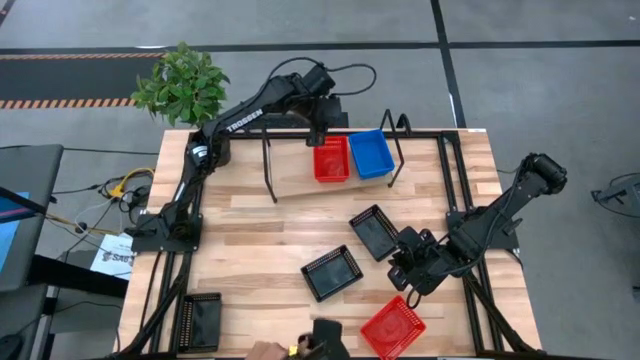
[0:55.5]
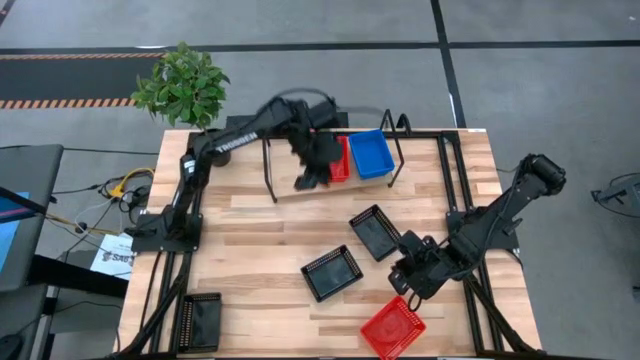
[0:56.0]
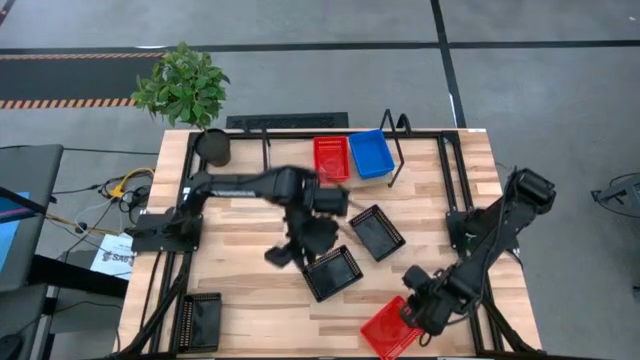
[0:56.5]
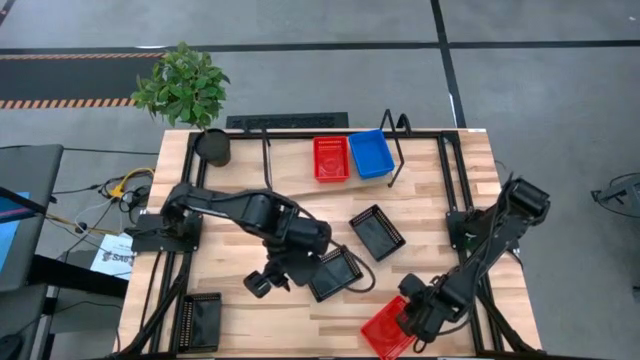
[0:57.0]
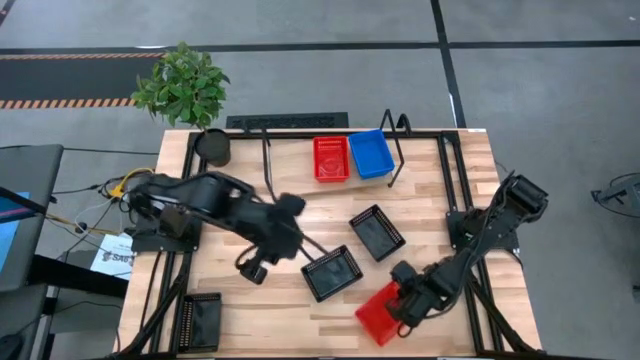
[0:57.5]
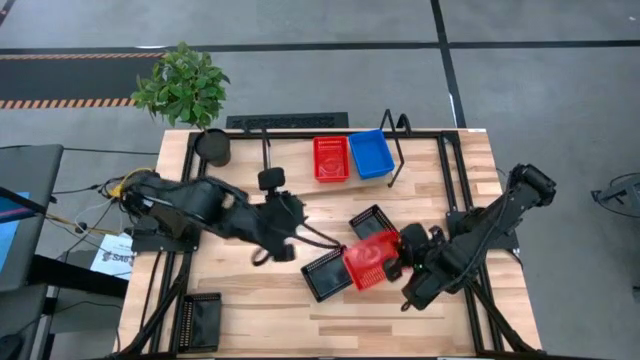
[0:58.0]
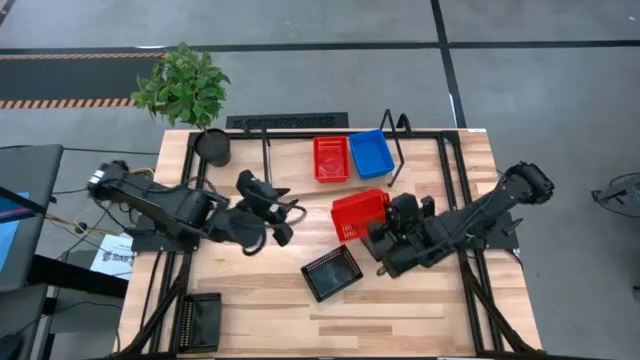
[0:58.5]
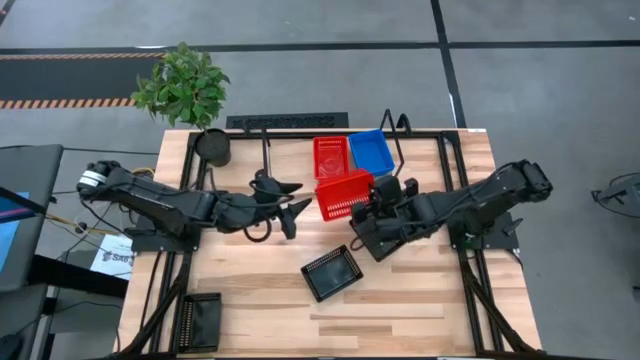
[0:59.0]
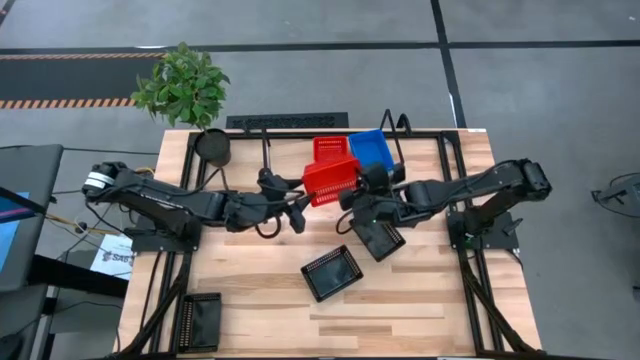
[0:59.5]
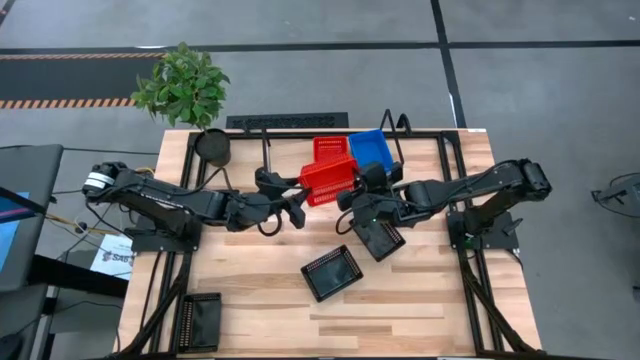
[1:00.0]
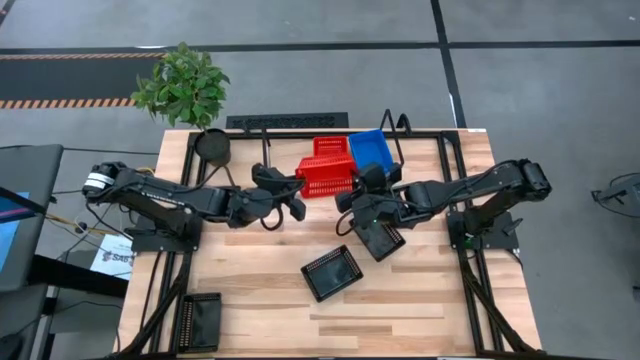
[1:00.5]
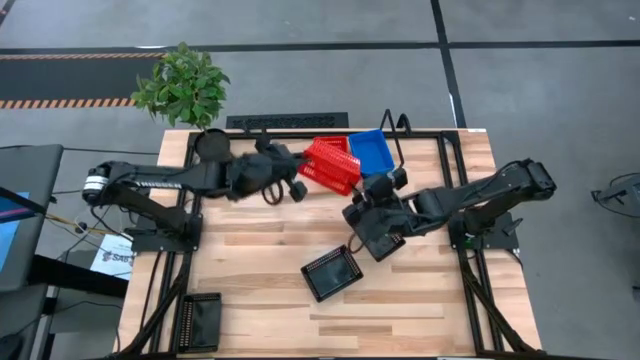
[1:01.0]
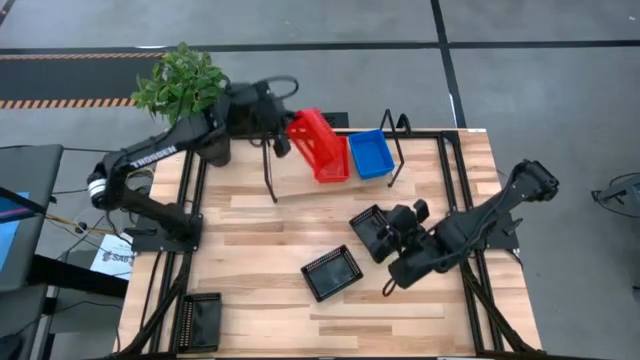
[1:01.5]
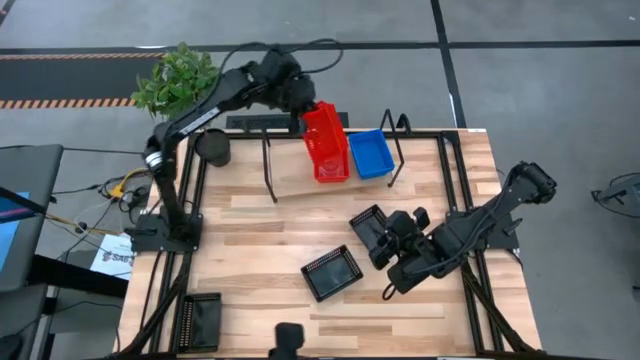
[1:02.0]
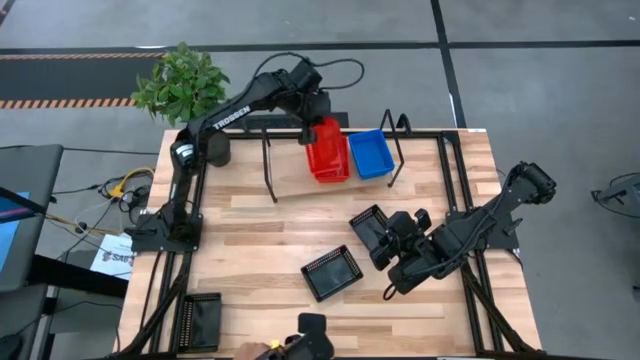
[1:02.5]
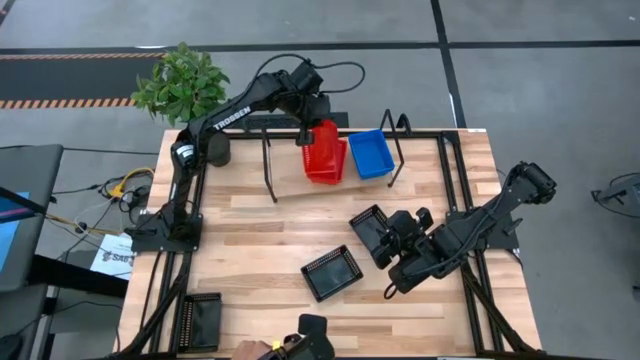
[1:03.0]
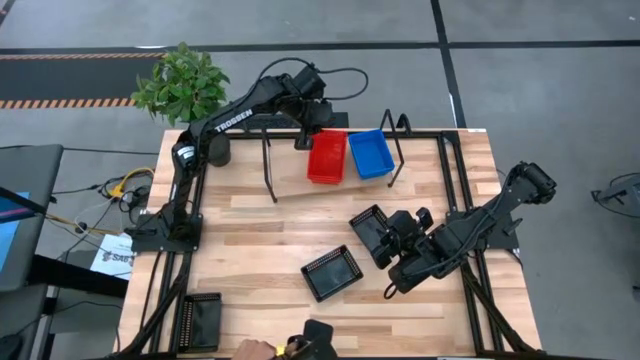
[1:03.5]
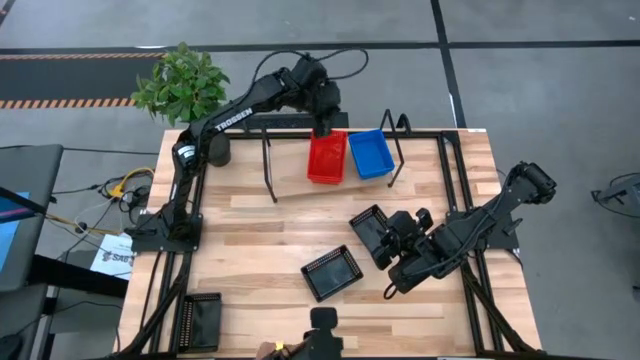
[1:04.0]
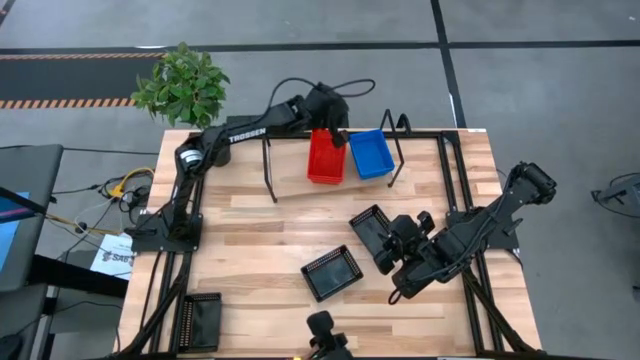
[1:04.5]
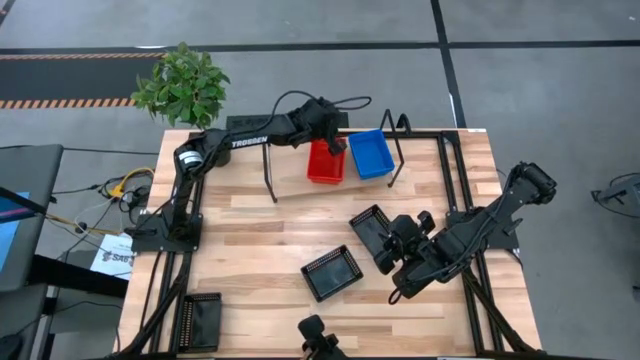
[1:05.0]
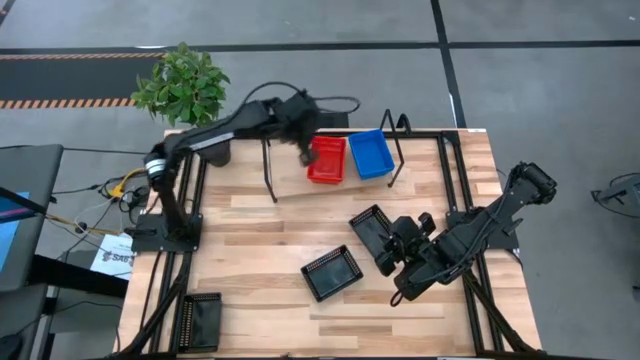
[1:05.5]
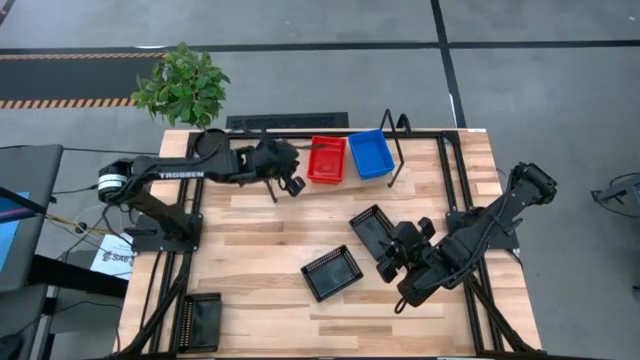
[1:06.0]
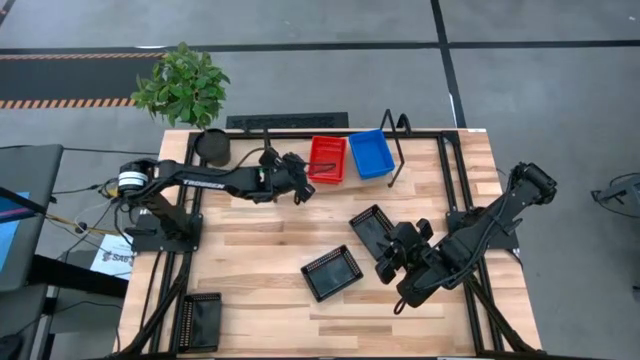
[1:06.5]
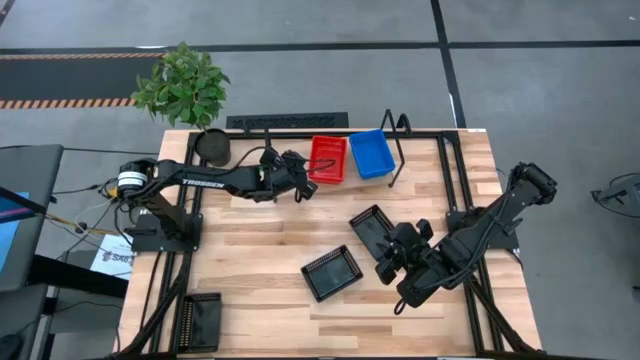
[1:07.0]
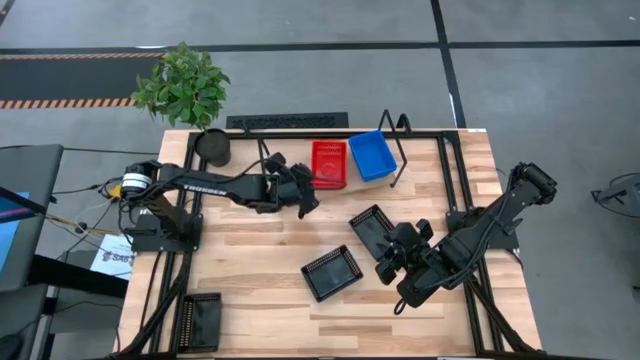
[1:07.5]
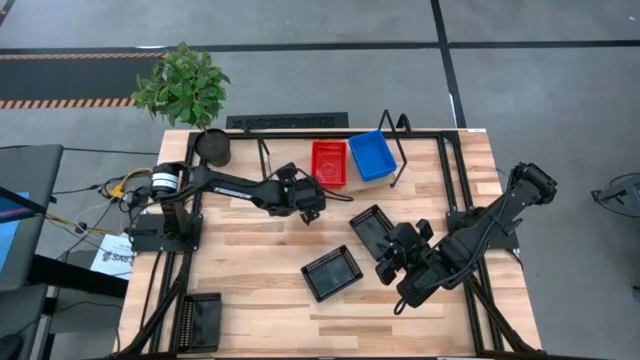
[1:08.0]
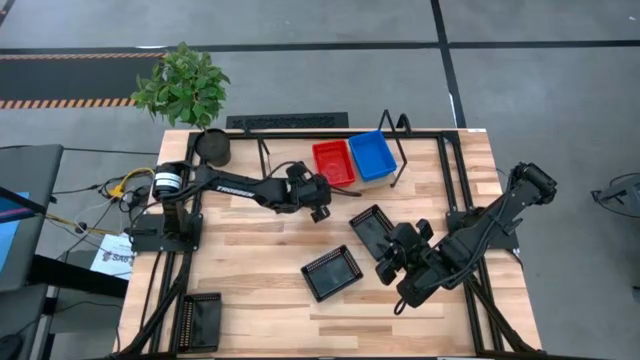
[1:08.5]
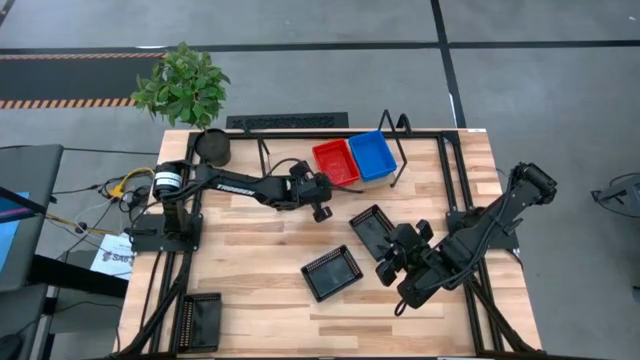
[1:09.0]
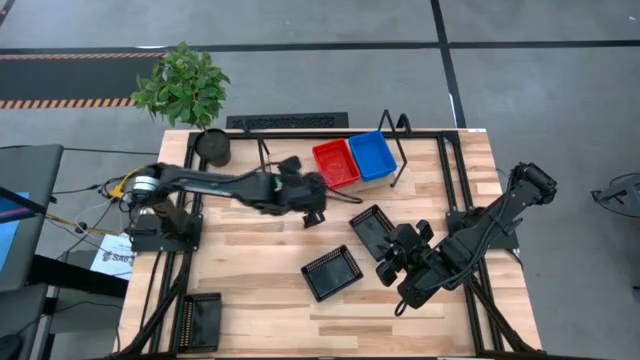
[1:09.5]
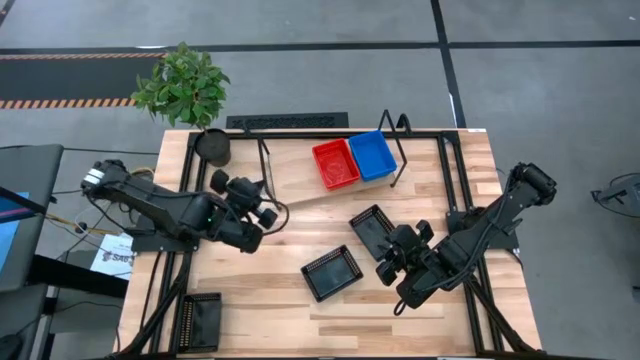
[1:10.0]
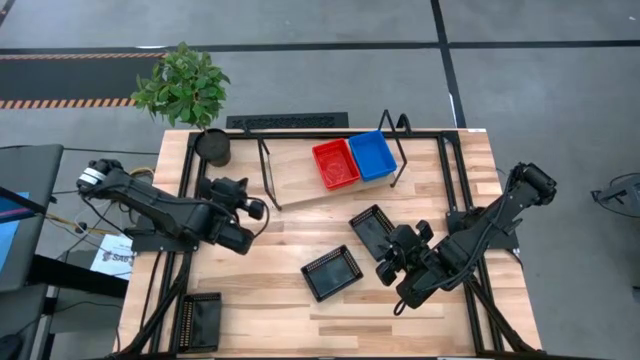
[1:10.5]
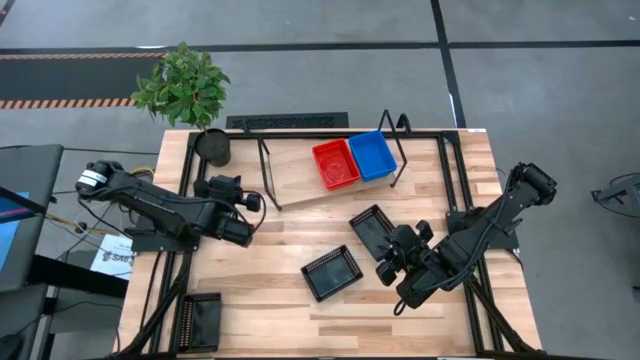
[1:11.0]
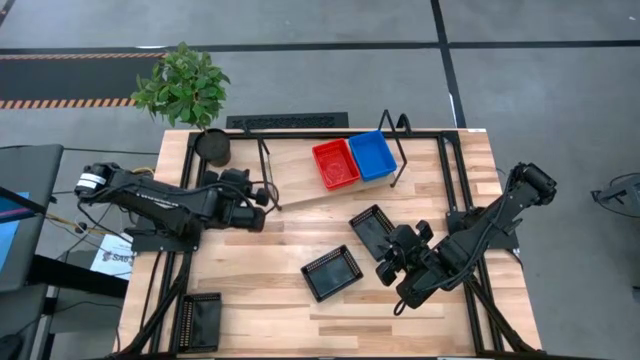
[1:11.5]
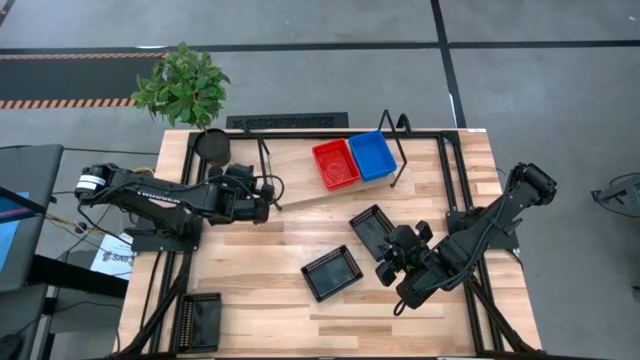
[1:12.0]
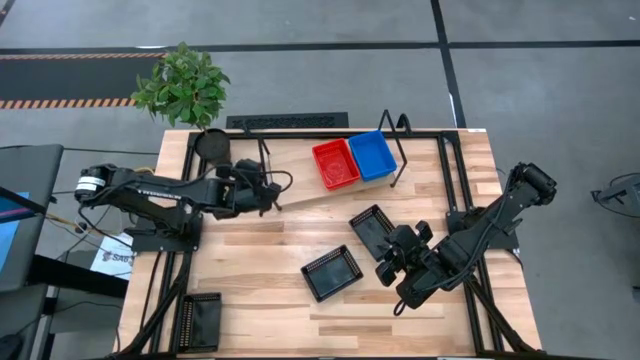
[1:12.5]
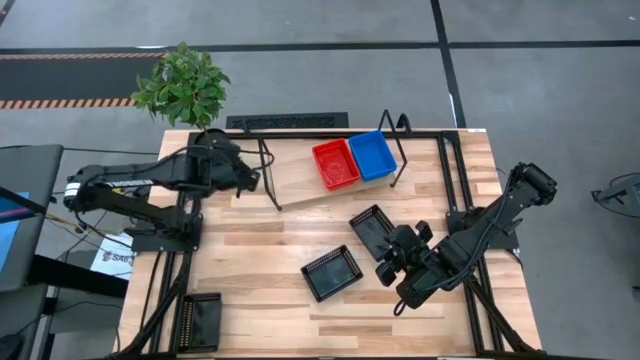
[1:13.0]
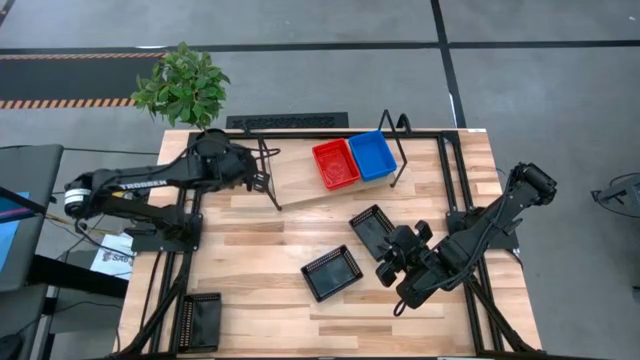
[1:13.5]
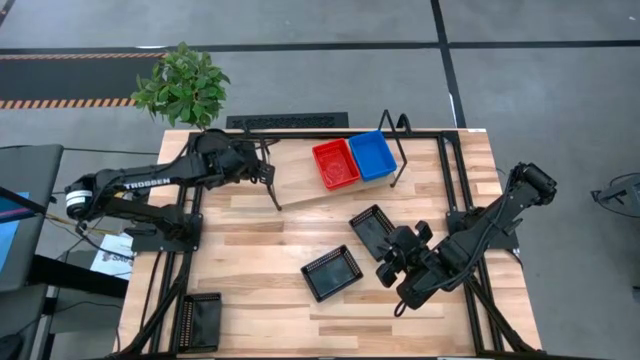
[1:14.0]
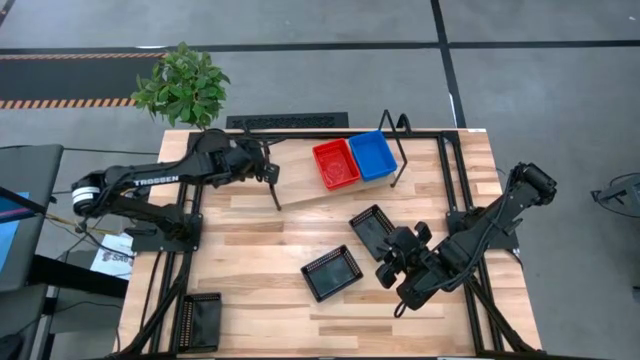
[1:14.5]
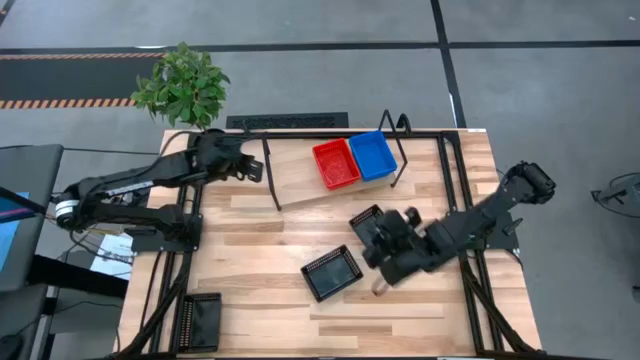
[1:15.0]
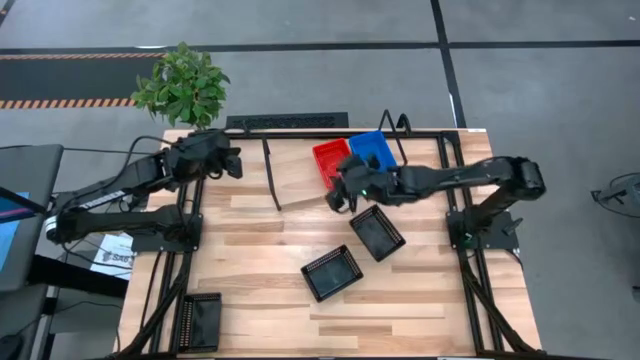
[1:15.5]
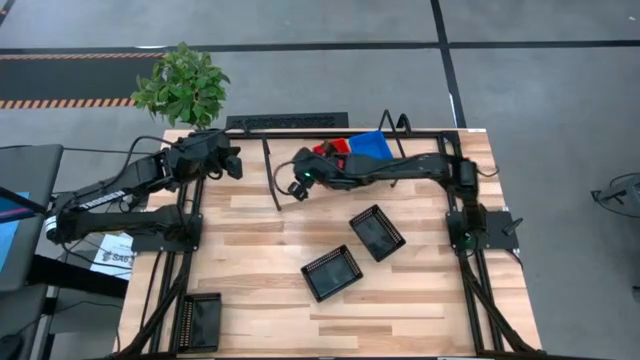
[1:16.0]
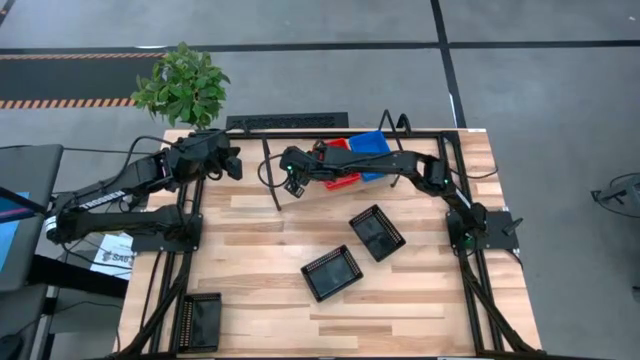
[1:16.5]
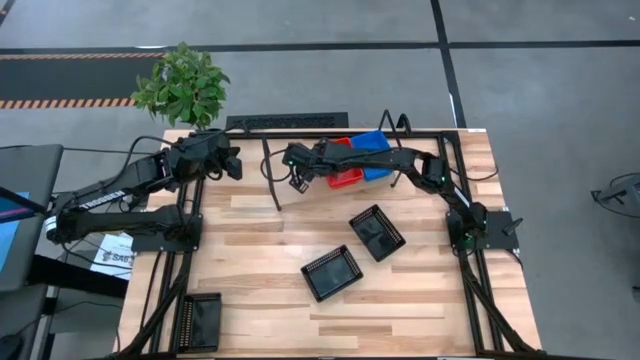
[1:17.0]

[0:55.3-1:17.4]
Task: Stack baskets on shelf by color
Stack the red bin on the top of the red bin on the shelf
